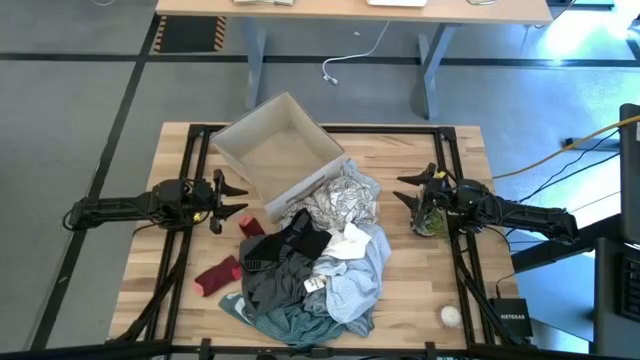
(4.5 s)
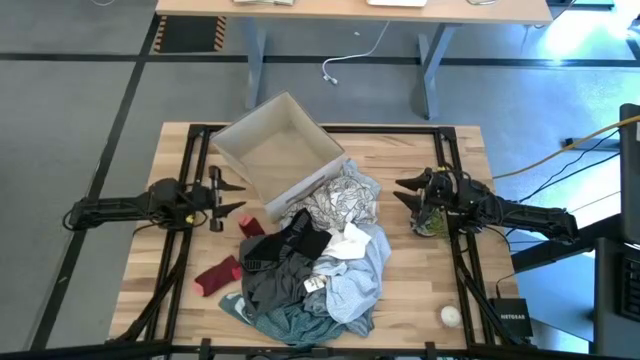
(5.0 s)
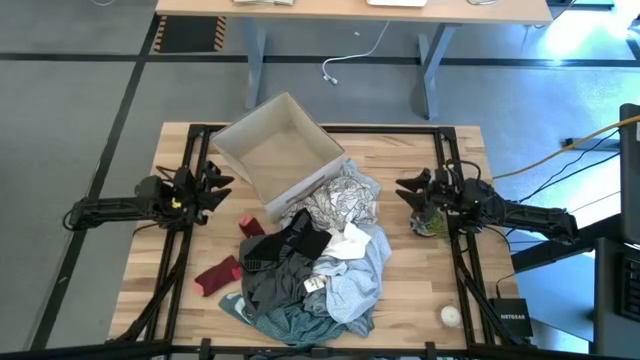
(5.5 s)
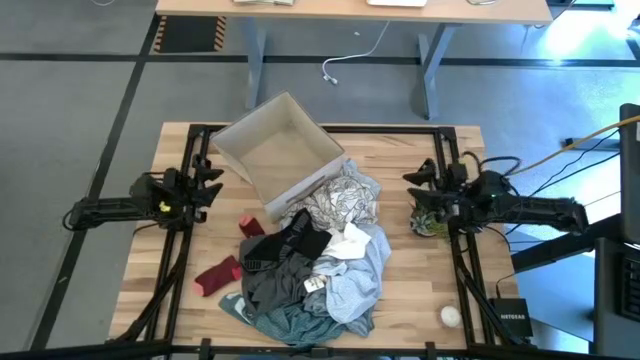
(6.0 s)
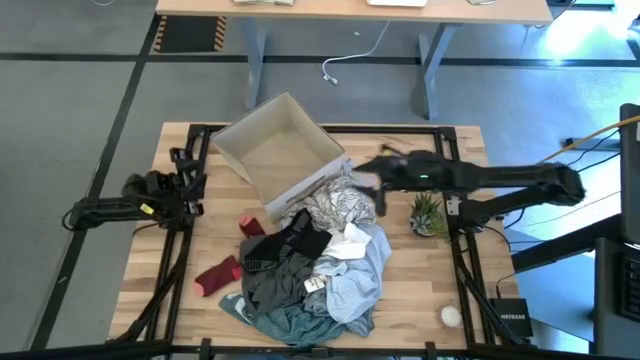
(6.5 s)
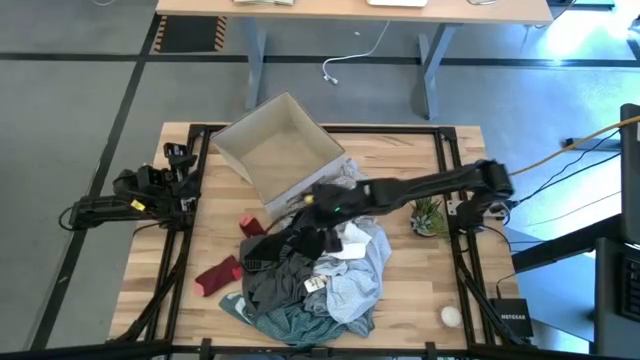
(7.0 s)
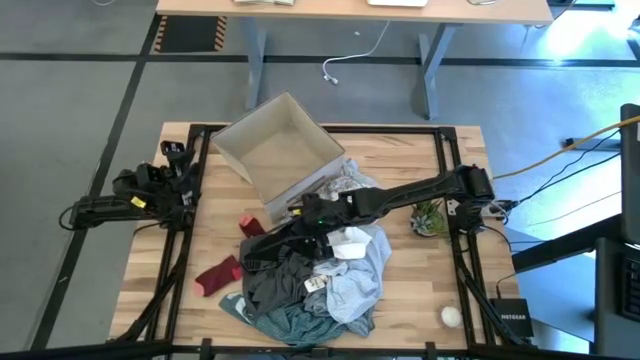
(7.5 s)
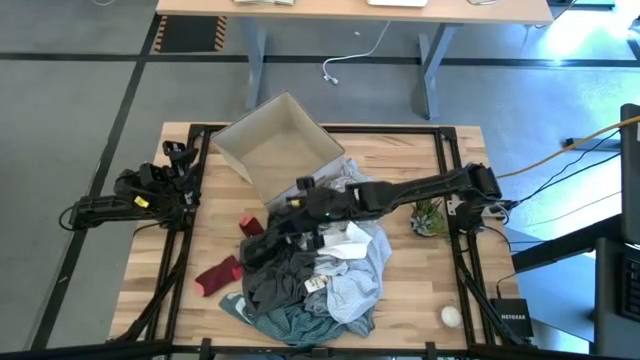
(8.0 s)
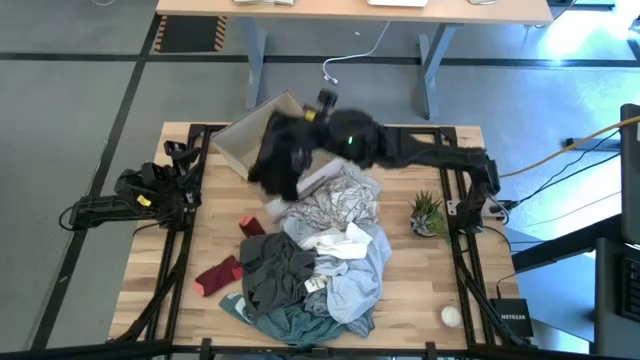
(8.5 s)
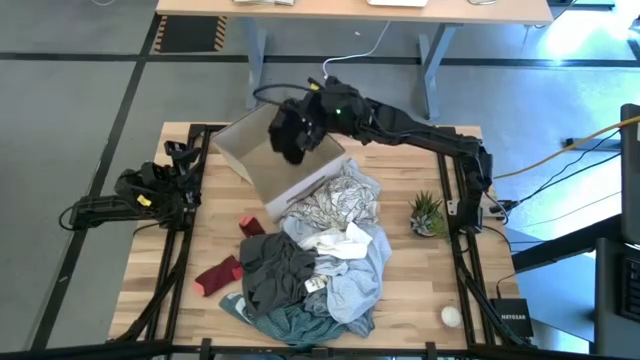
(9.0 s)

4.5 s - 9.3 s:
Task: Sort clothes
Put the black underwear into the laundry organizer

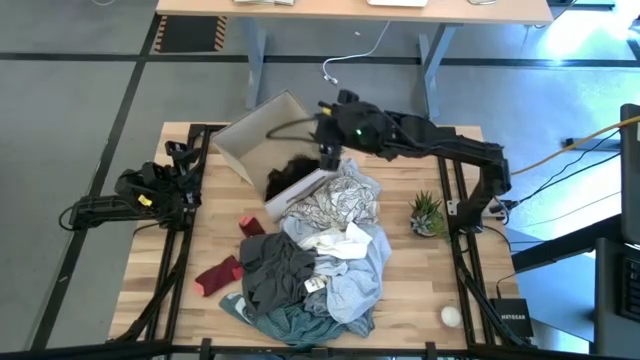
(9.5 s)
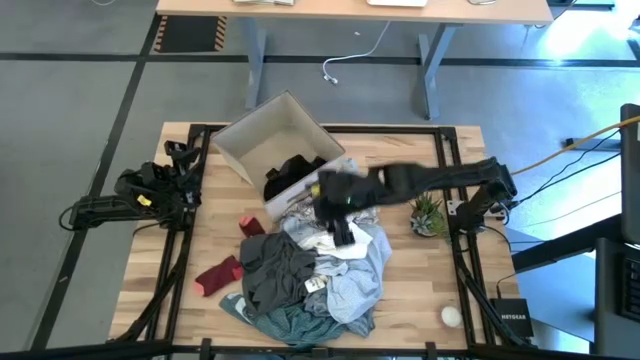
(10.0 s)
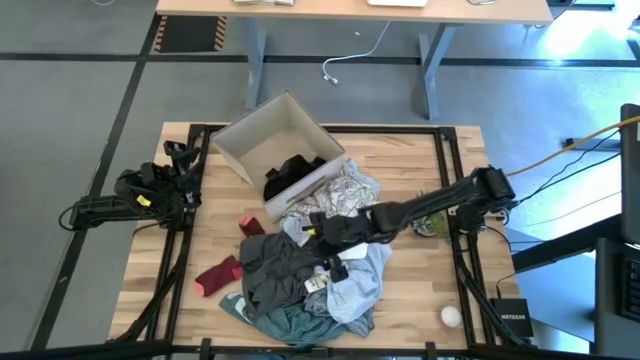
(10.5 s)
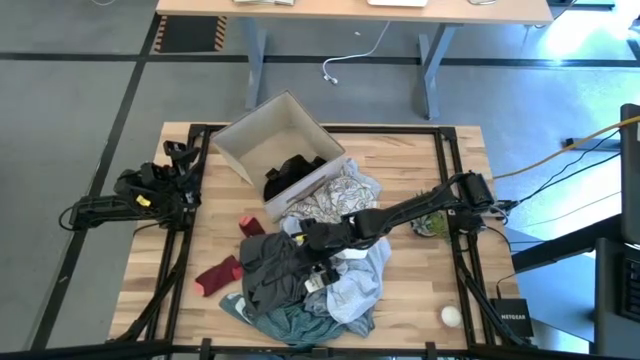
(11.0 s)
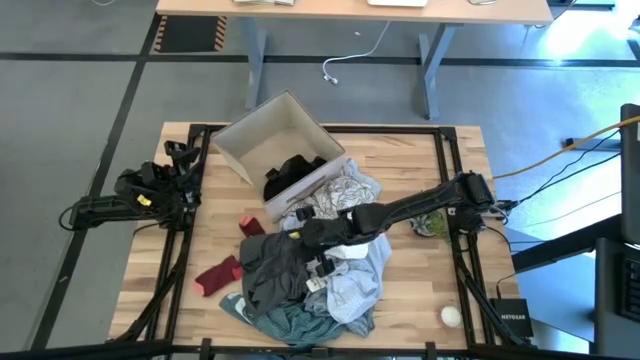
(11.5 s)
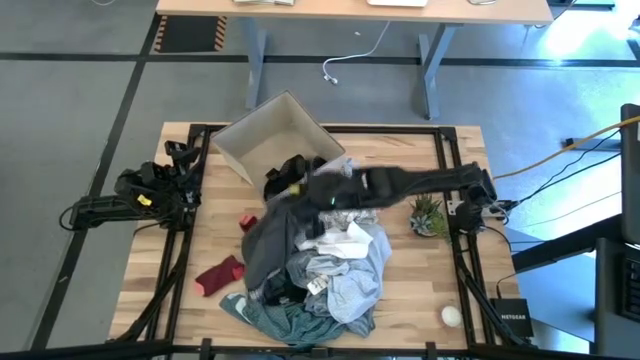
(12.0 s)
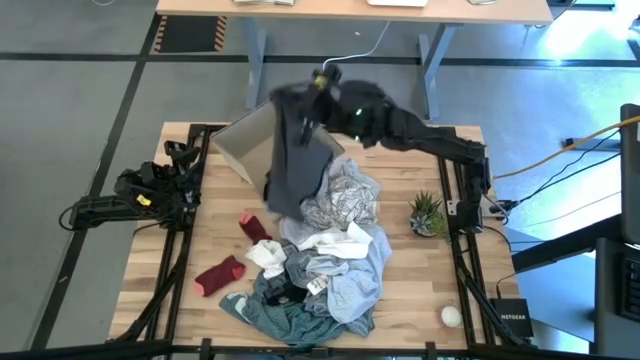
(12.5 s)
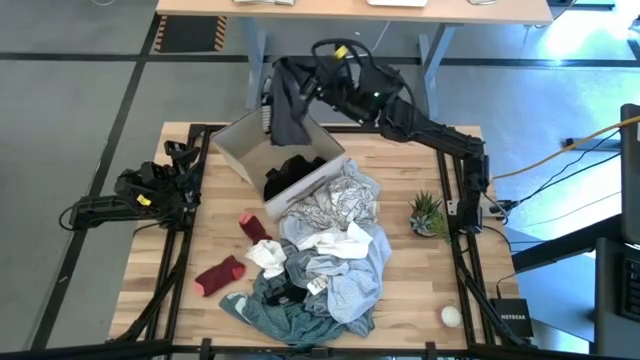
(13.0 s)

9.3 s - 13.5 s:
Put the gray underwear into the laundry organizer

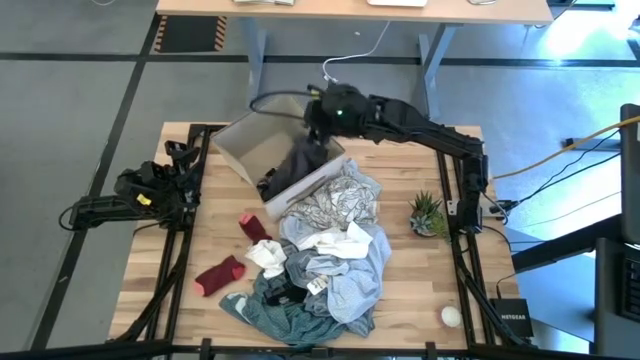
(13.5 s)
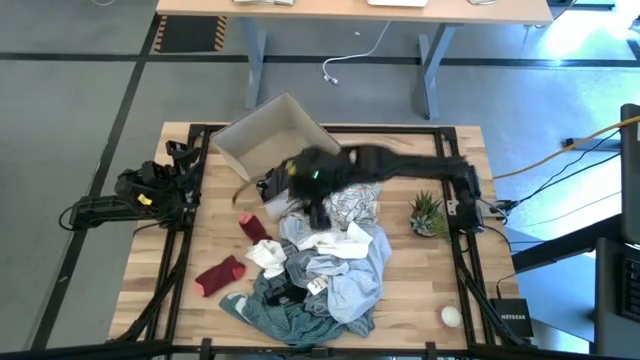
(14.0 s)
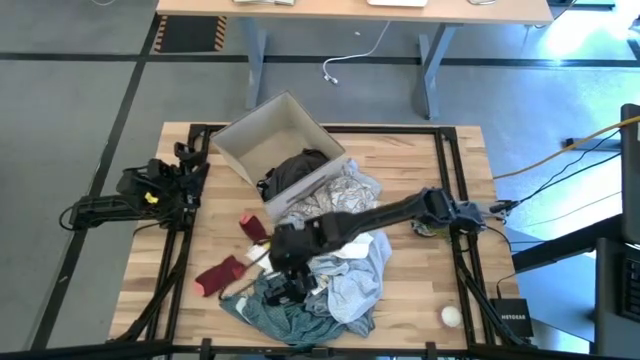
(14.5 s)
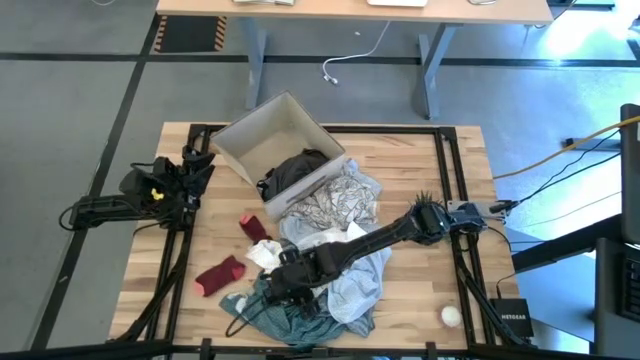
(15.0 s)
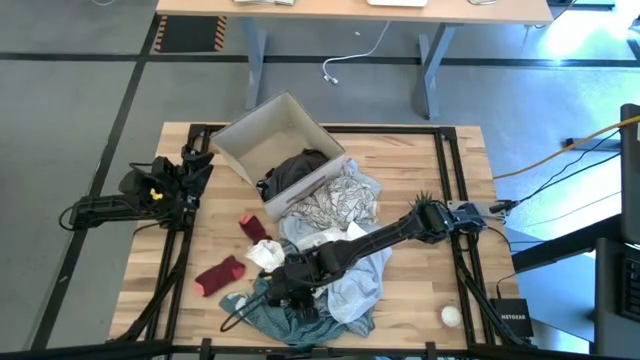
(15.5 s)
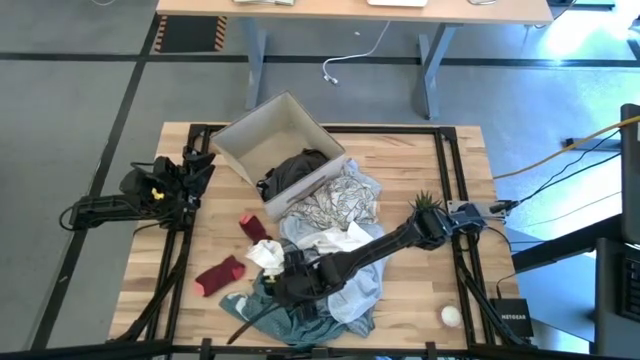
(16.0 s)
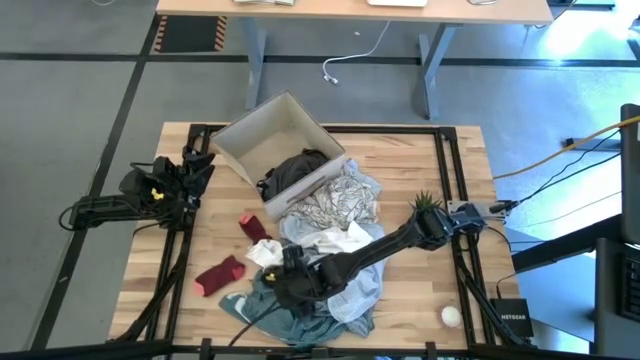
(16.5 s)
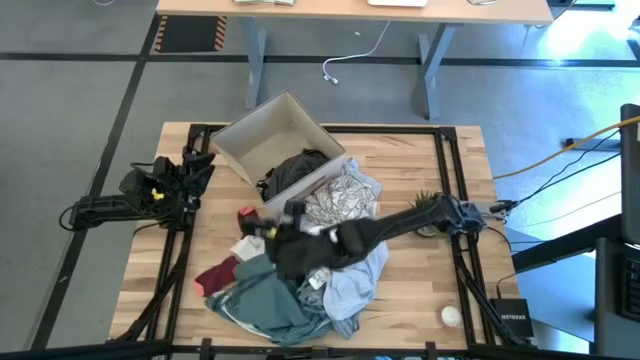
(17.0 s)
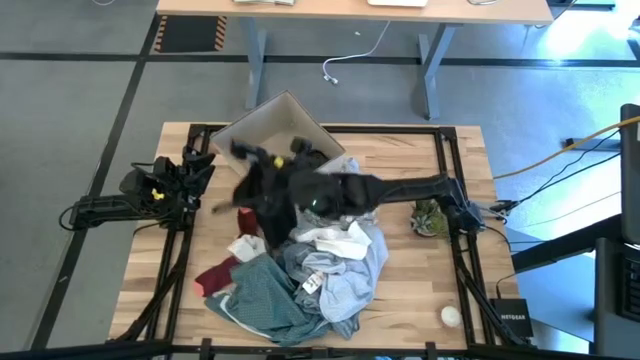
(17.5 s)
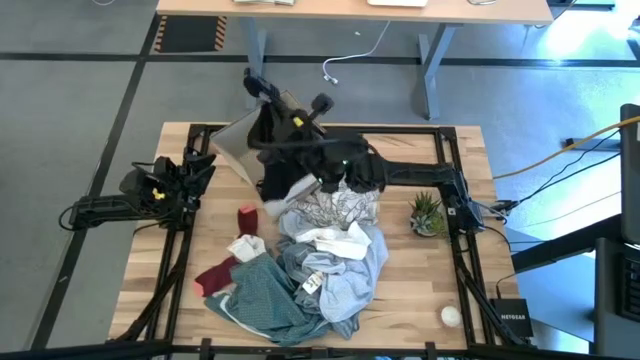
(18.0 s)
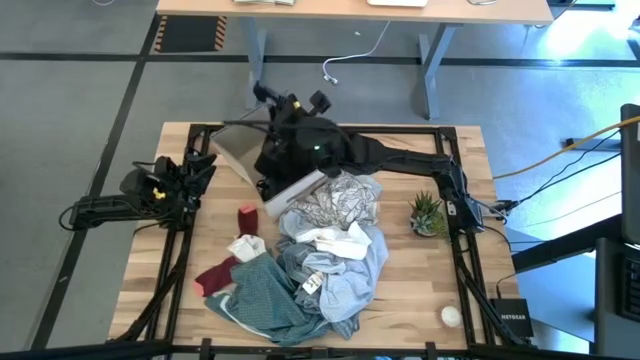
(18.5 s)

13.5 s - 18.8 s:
Put the black underwear into the laundry organizer

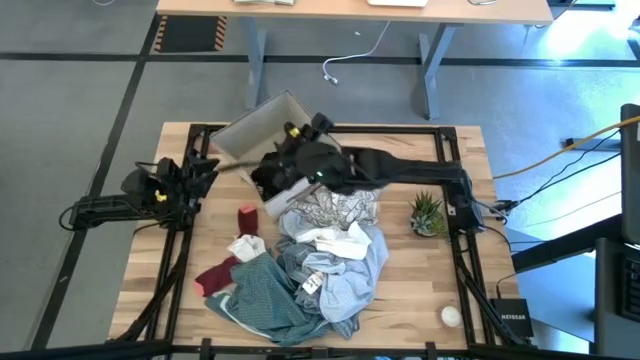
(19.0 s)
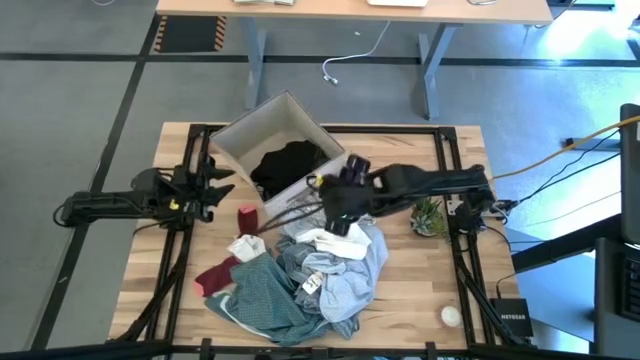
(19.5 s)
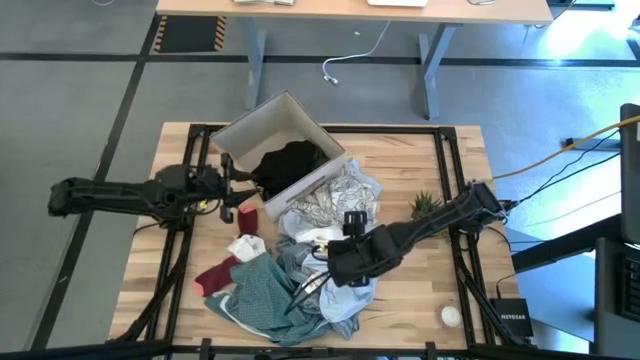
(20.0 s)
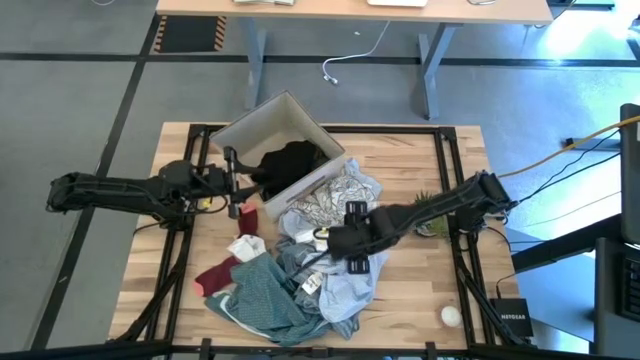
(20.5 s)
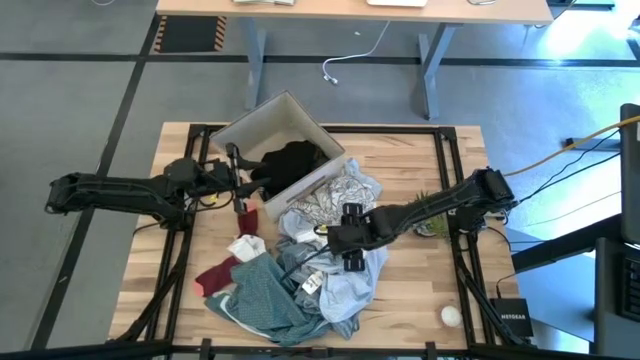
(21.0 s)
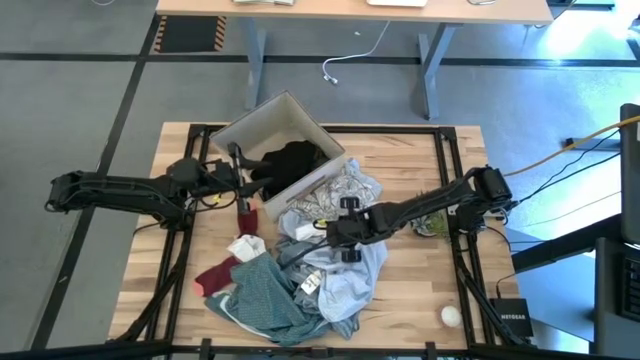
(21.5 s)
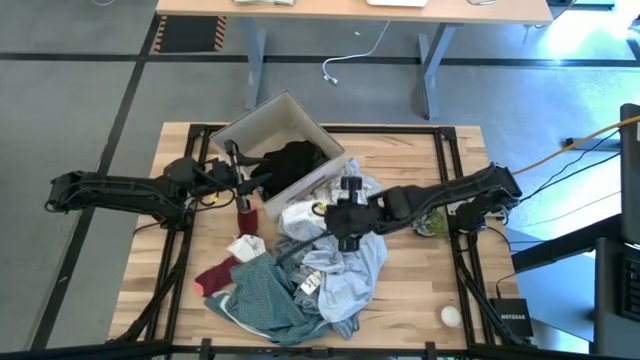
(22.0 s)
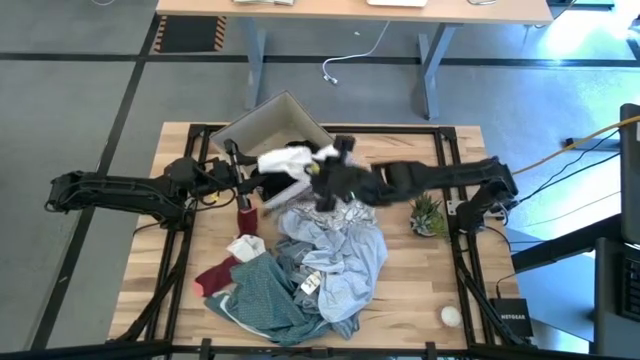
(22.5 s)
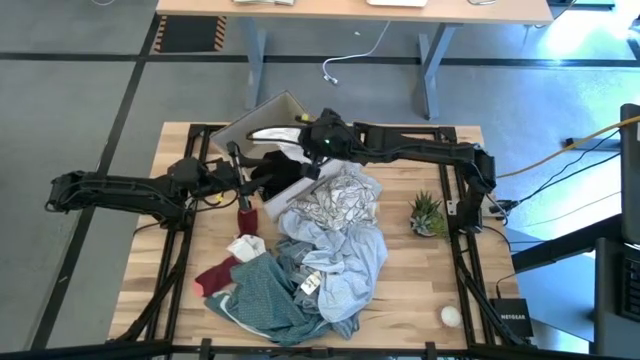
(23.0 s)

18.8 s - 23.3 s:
Put the white underwear into the laundry organizer

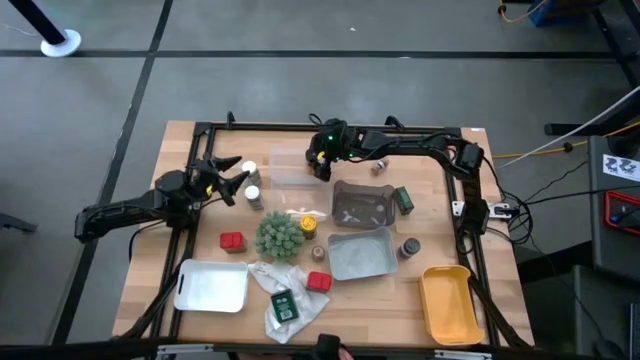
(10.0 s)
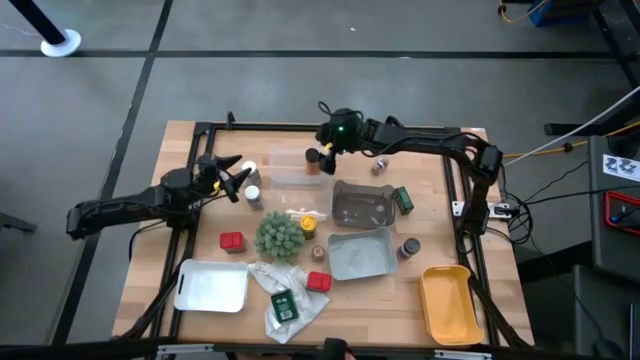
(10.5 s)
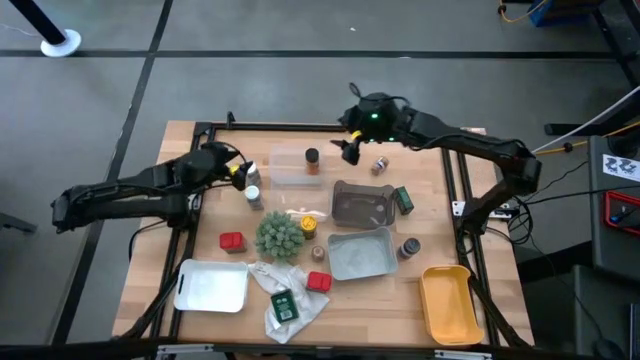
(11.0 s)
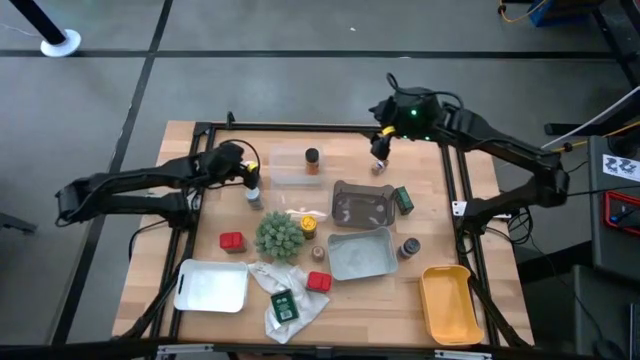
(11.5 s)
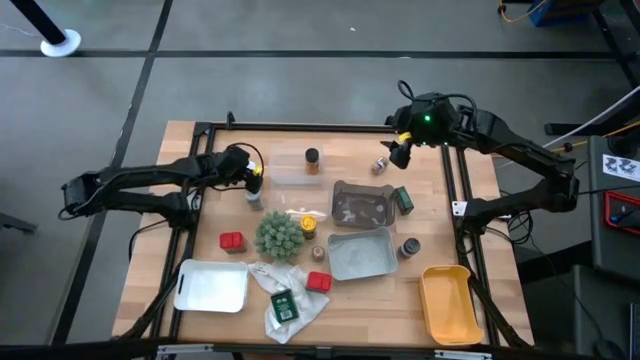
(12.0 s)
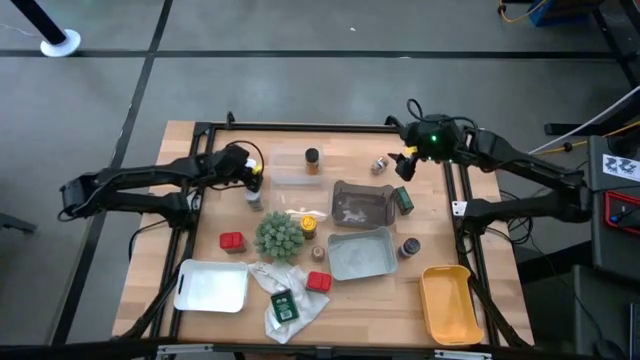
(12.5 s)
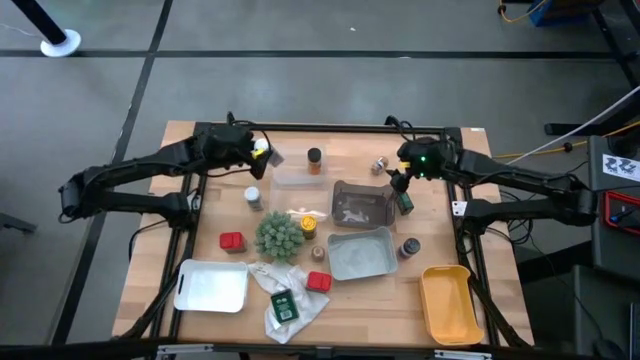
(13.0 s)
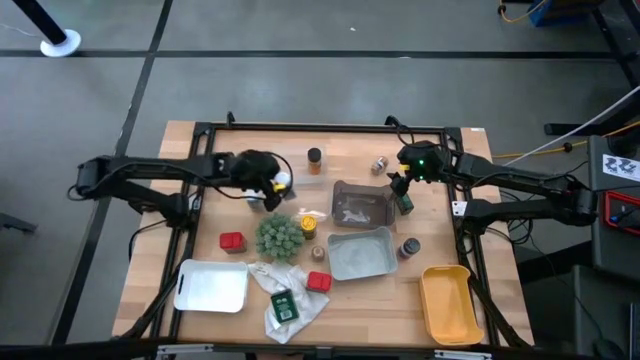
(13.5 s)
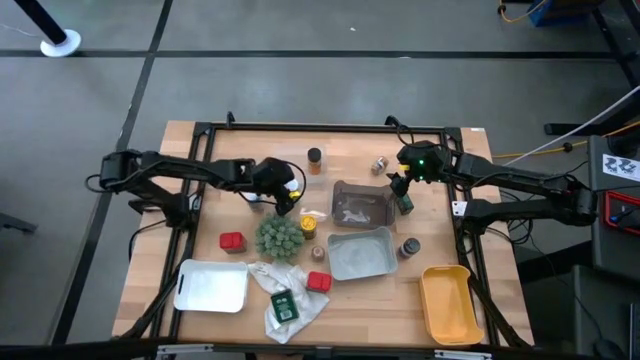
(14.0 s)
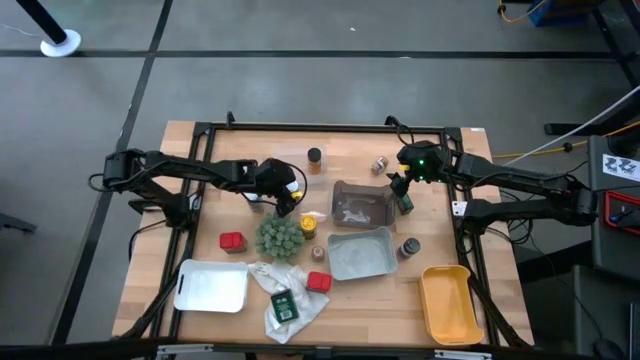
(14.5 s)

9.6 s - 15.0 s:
Task: Sort spices by type
Put the top white seasoning bottle into the bottom transparent bin
